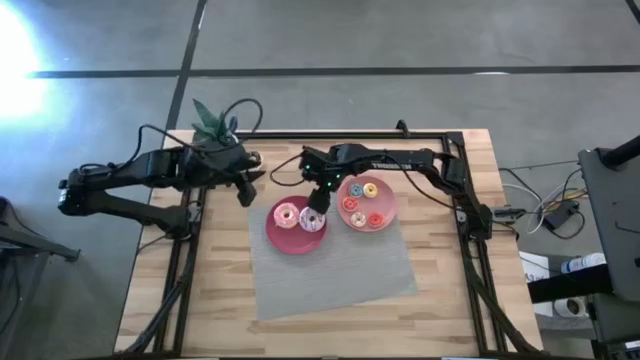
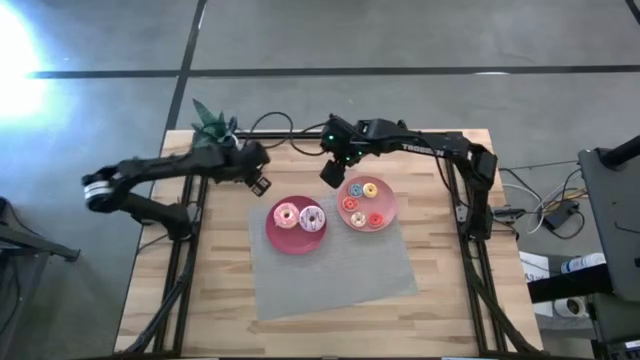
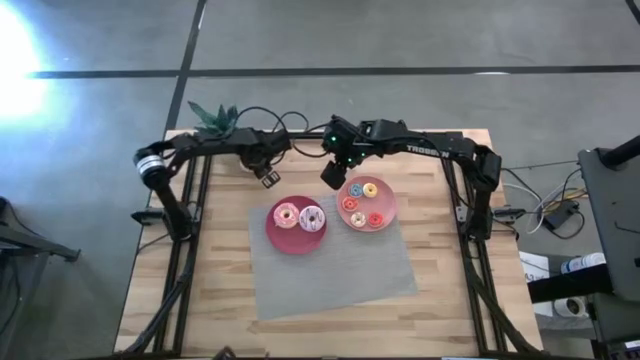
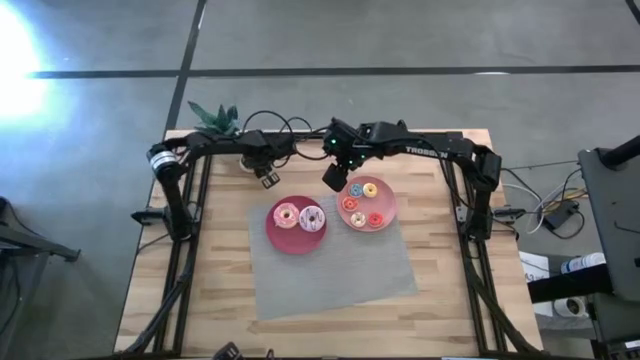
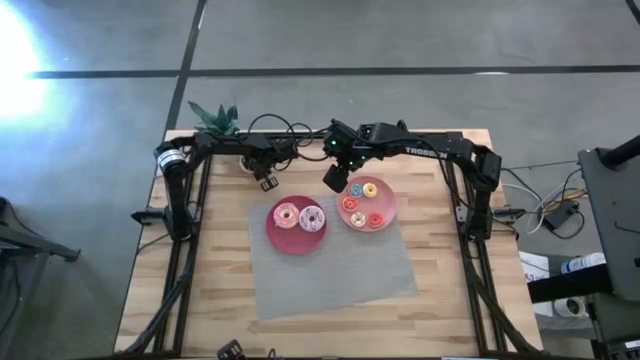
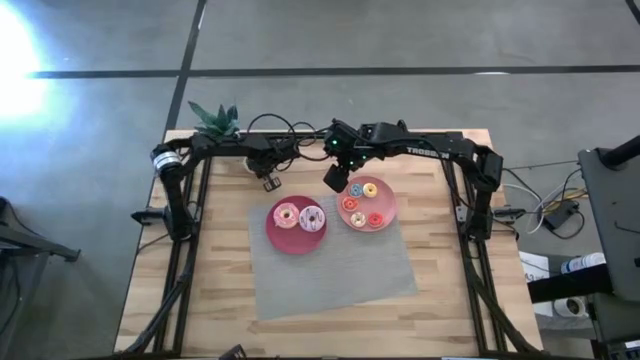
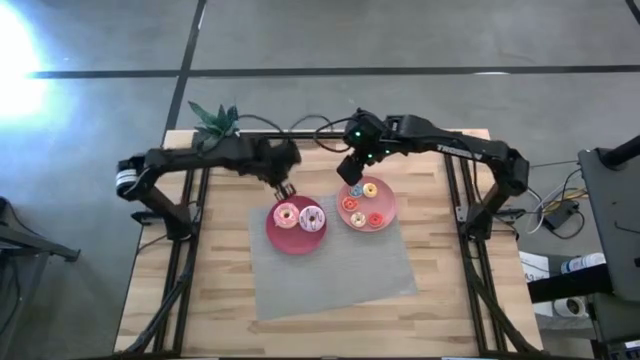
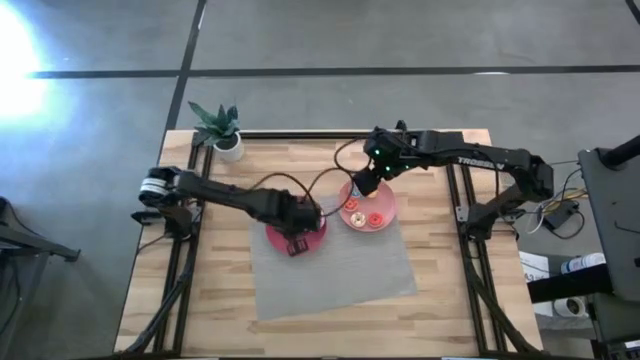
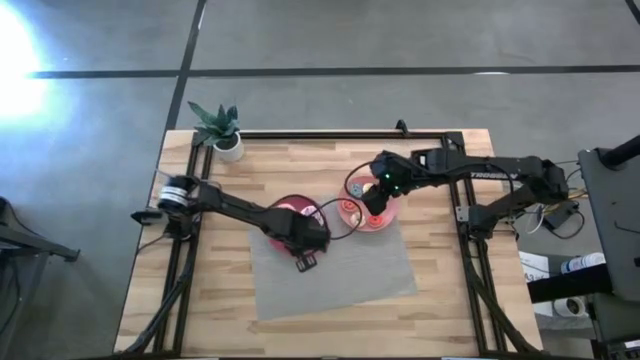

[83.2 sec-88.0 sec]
Task: Pick & Place donuts
Put the big black donut on the pink plate

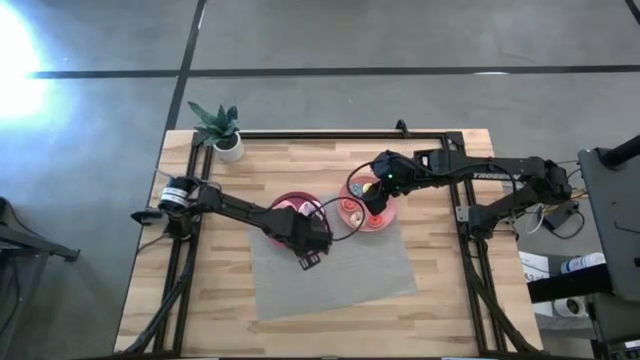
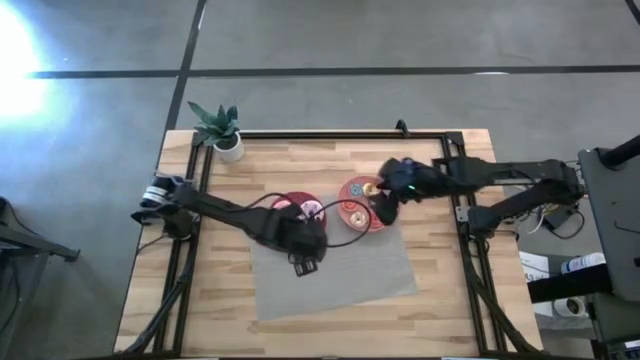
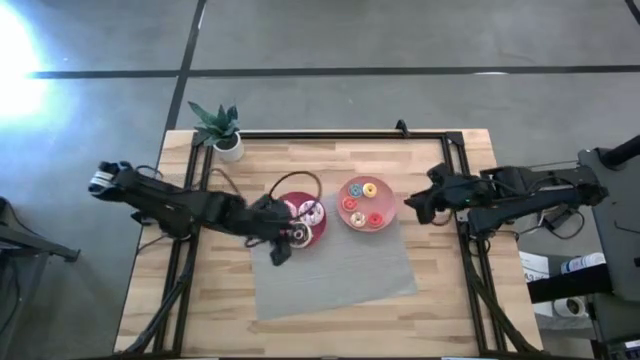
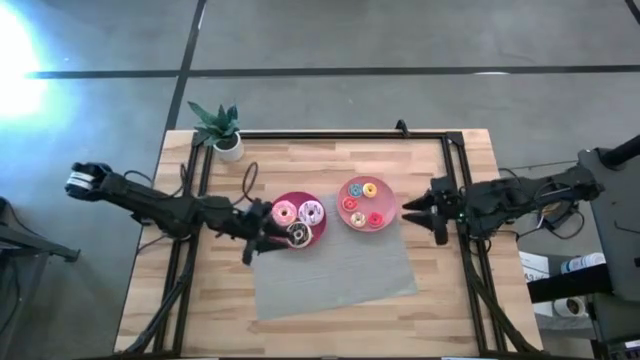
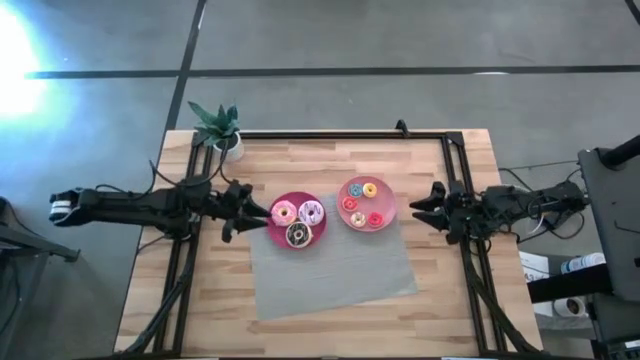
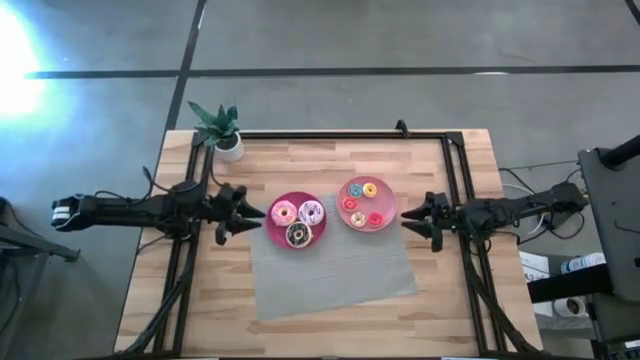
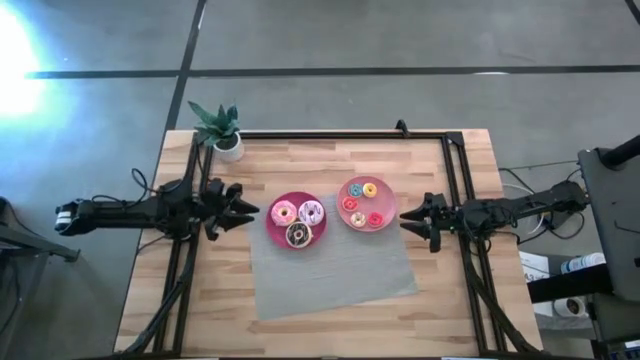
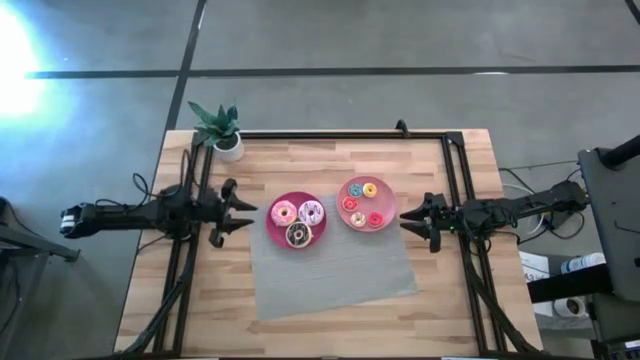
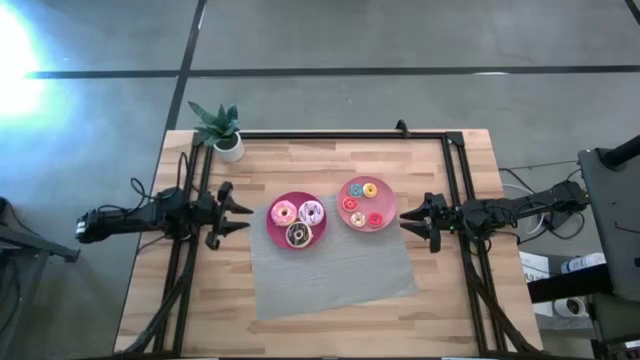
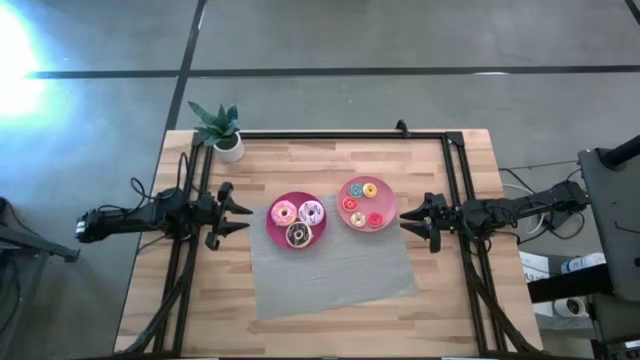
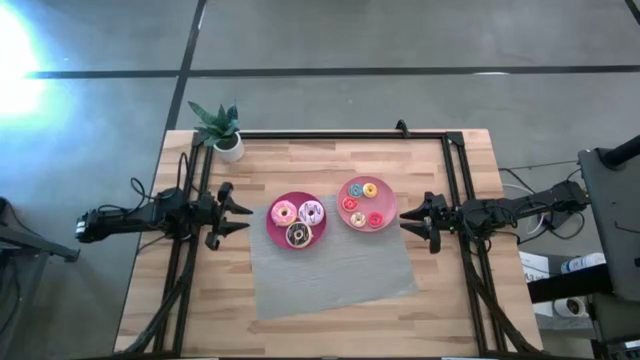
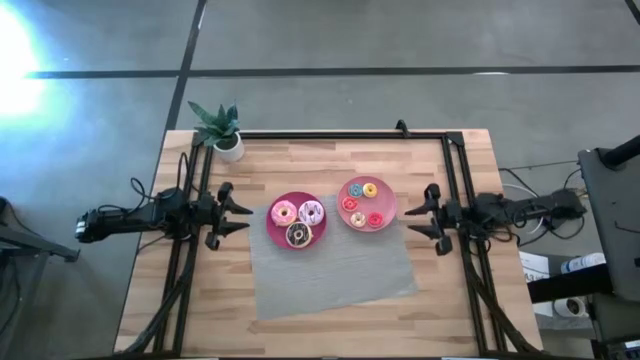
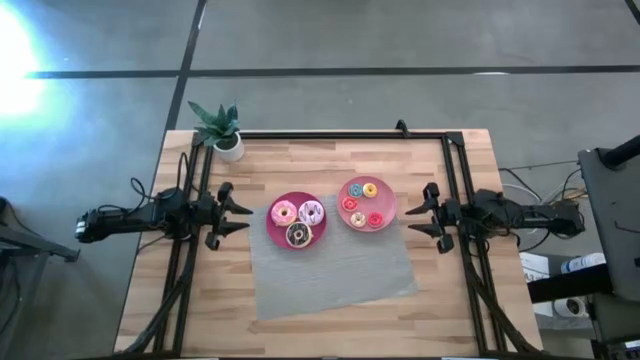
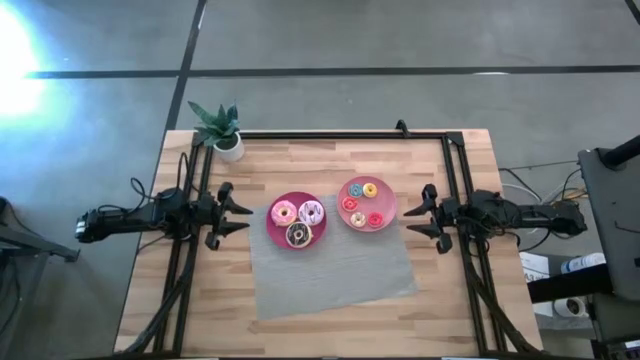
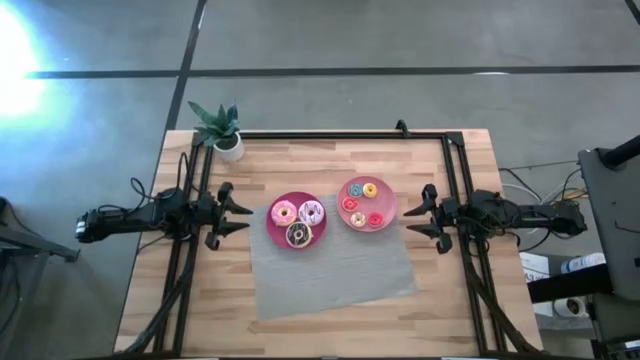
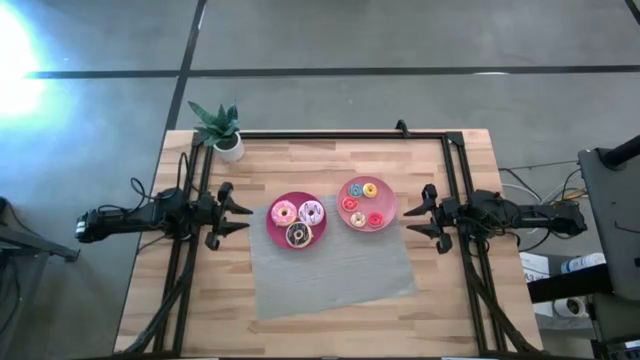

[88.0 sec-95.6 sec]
Return to Home Position

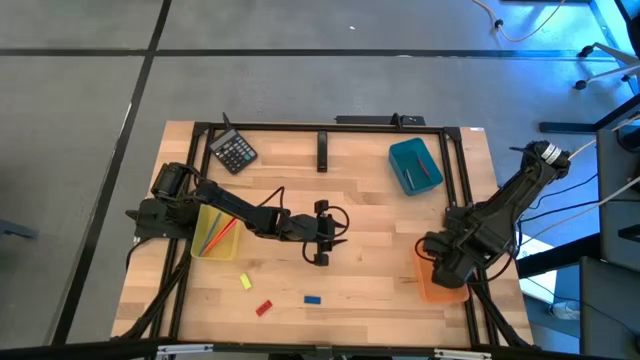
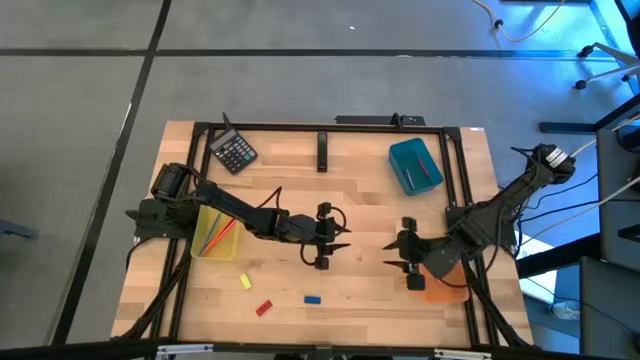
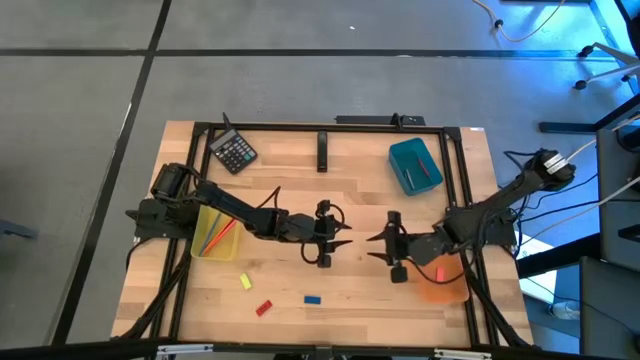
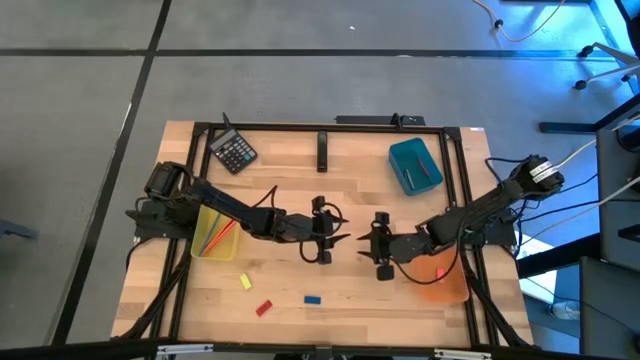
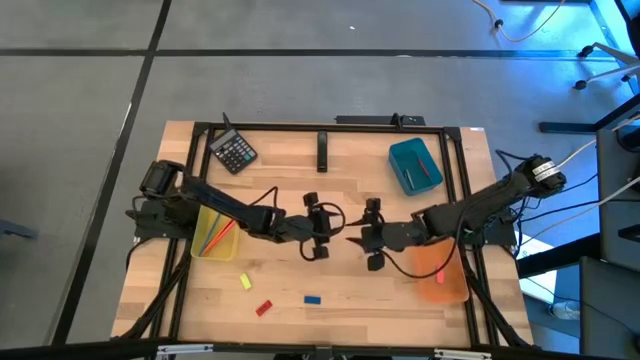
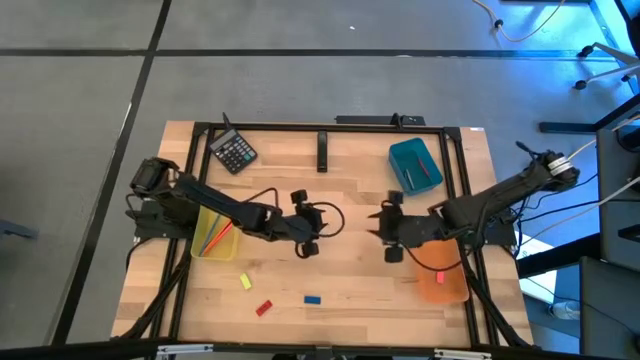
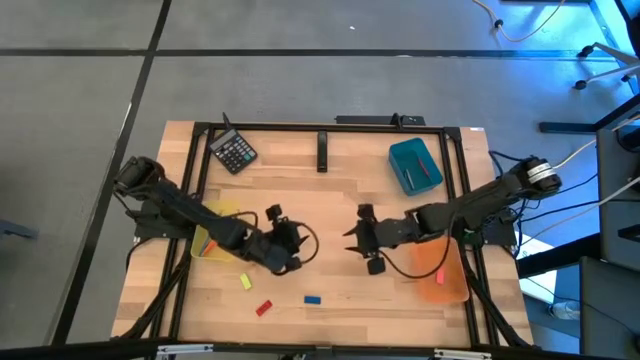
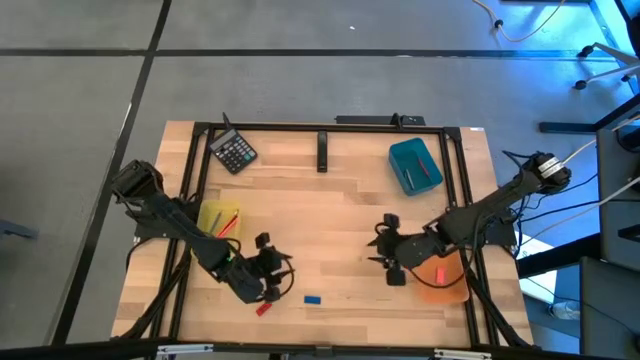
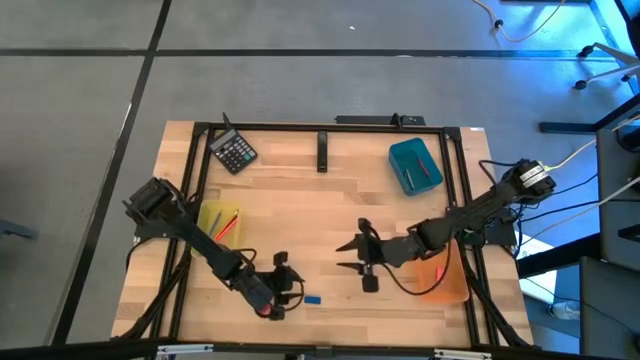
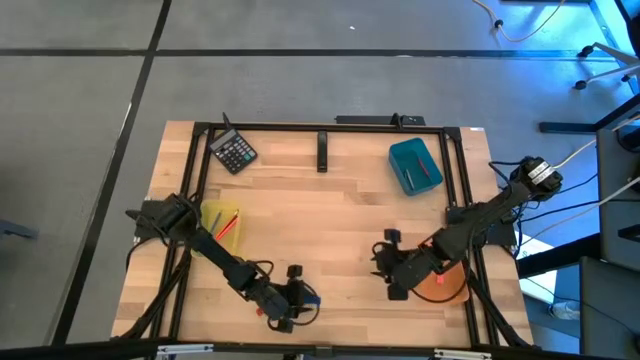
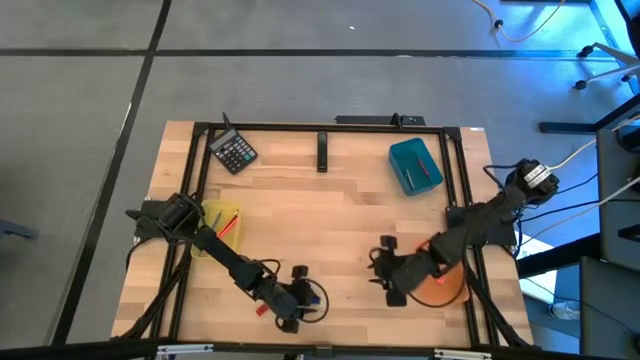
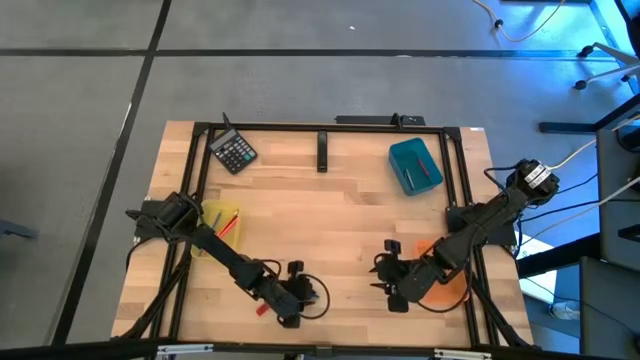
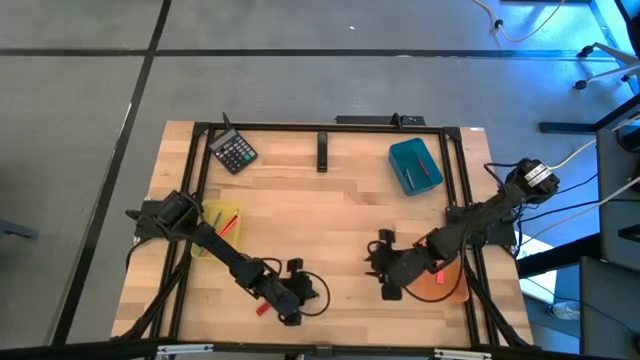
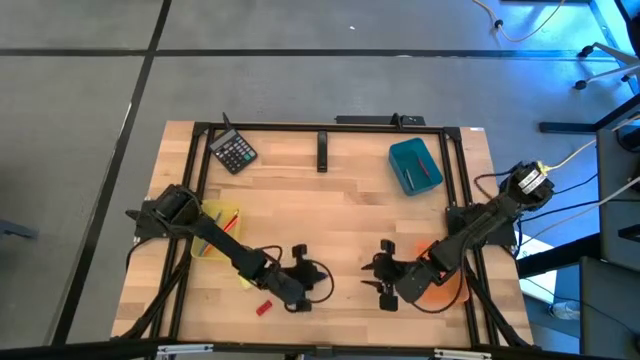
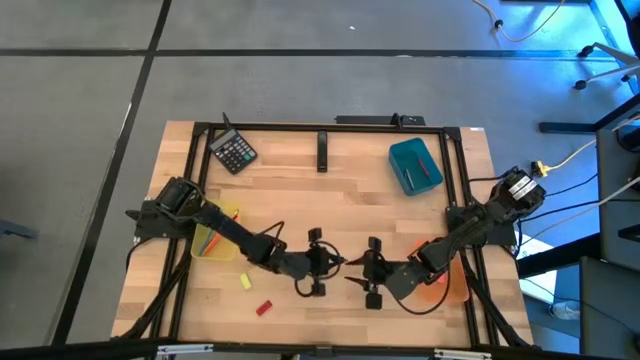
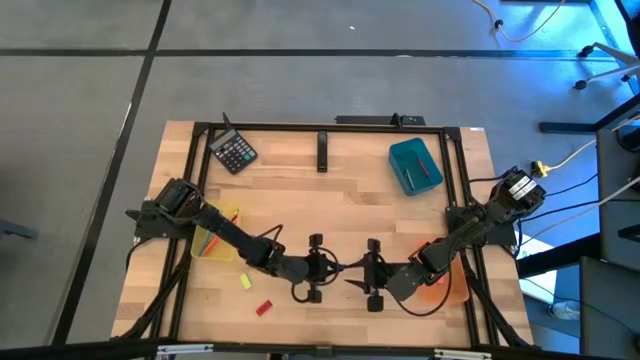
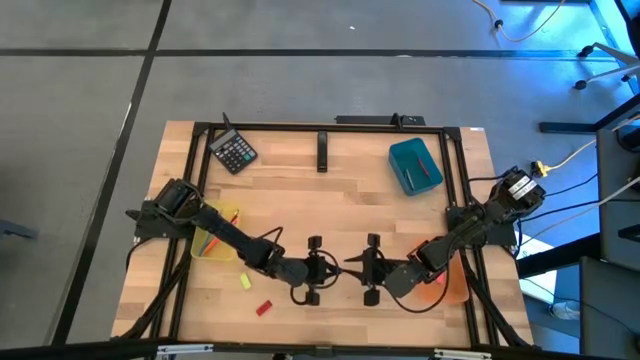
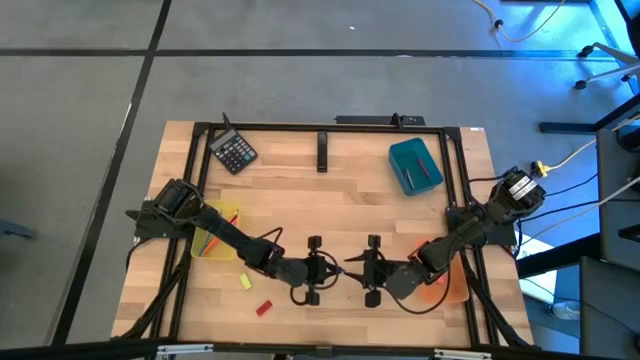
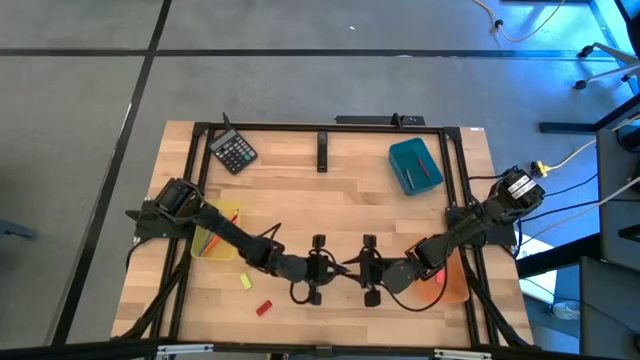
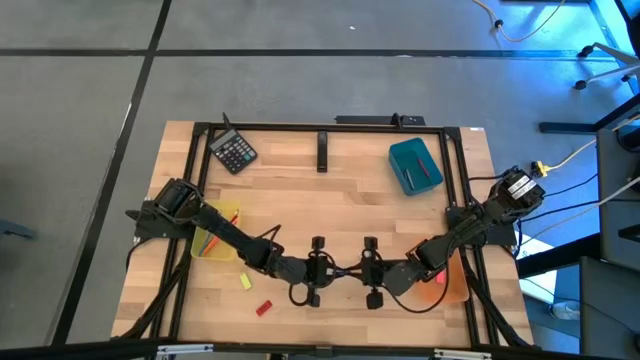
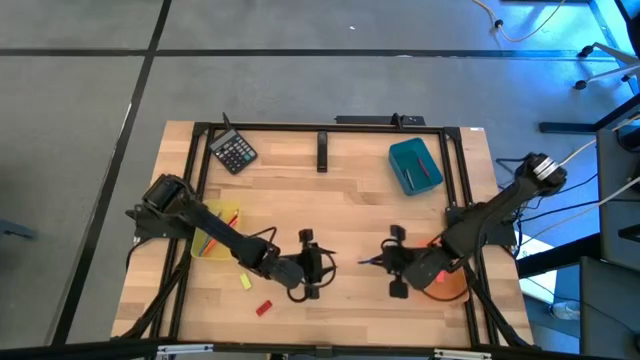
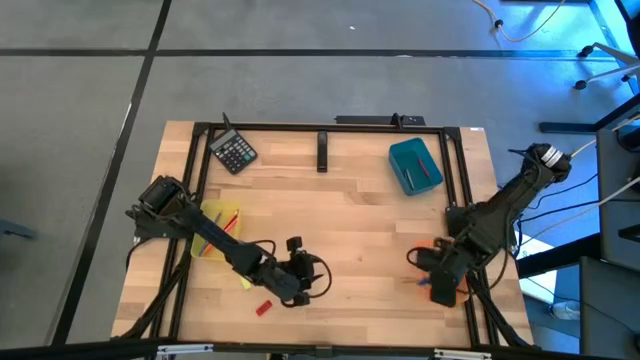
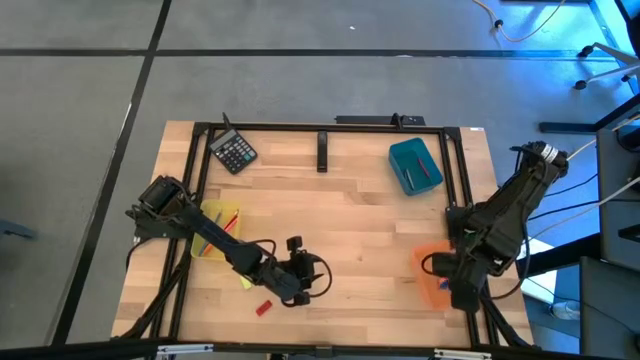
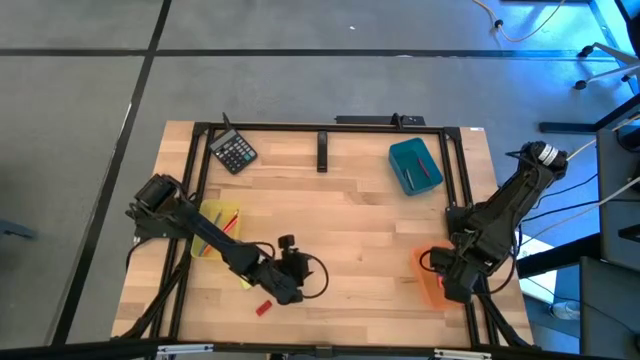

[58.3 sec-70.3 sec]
Task: Sort crayons/erasers/pens/pencils in bins
Put the blue eraser into the orange bin
